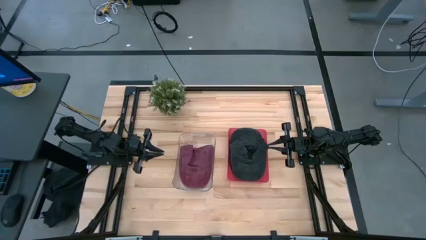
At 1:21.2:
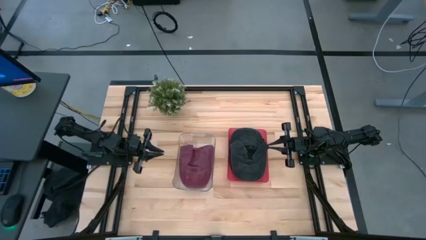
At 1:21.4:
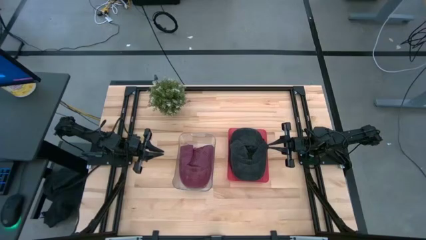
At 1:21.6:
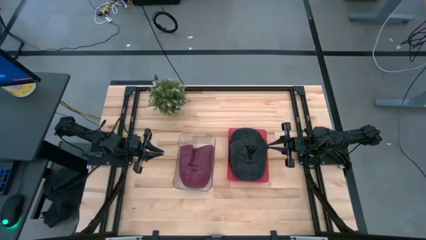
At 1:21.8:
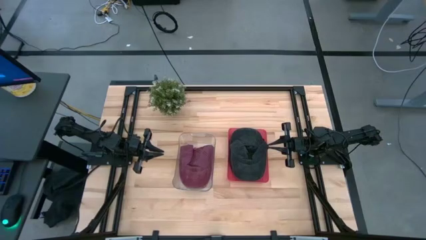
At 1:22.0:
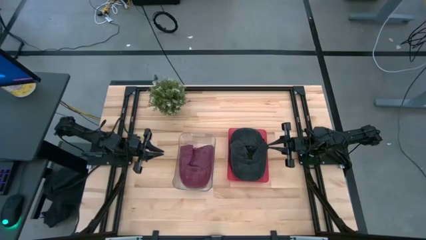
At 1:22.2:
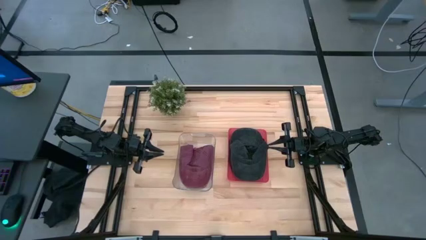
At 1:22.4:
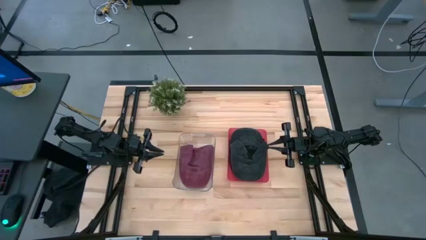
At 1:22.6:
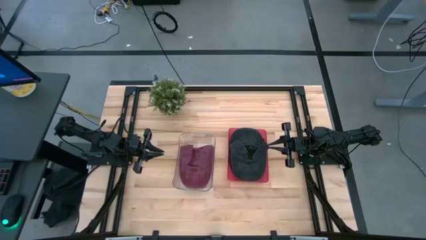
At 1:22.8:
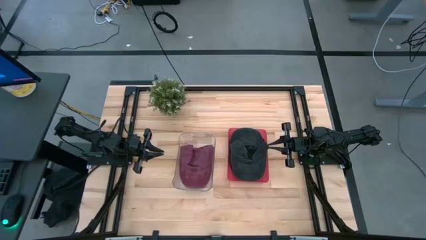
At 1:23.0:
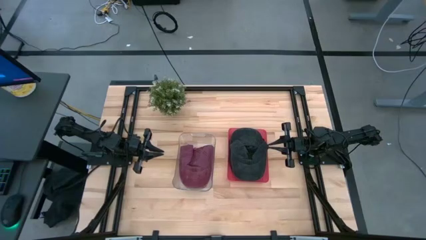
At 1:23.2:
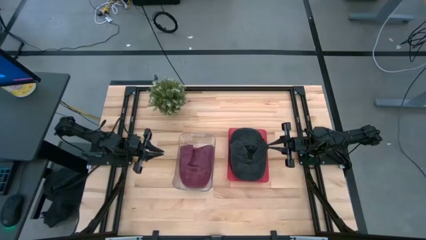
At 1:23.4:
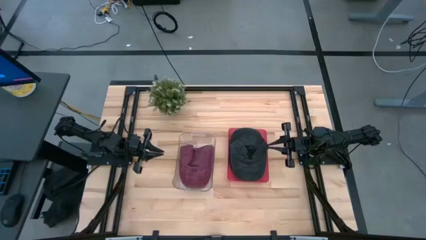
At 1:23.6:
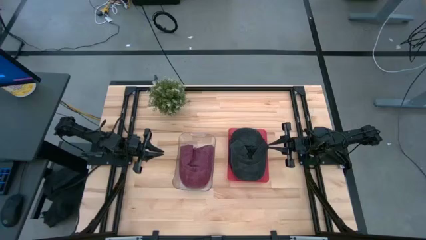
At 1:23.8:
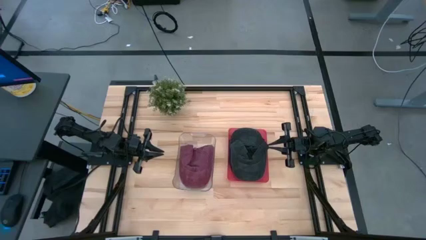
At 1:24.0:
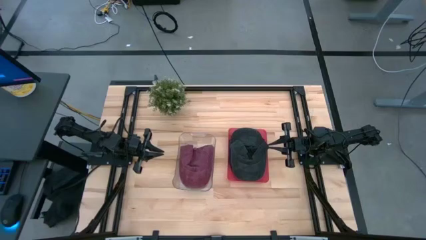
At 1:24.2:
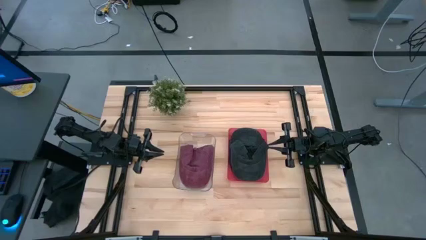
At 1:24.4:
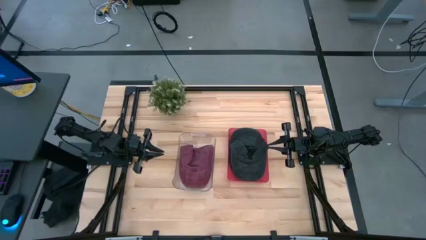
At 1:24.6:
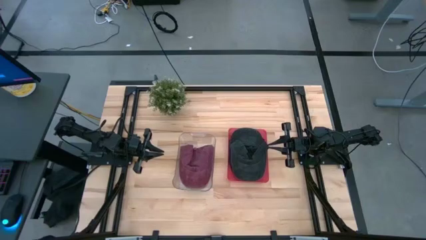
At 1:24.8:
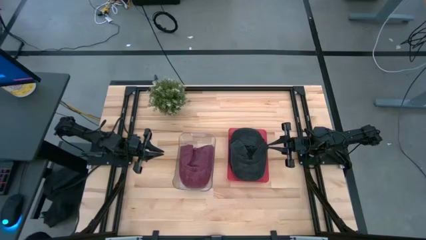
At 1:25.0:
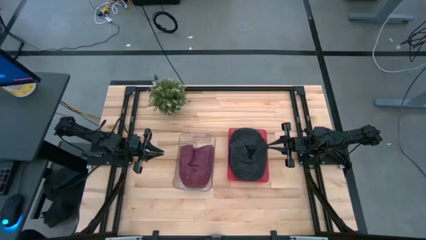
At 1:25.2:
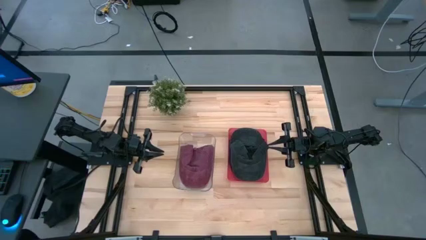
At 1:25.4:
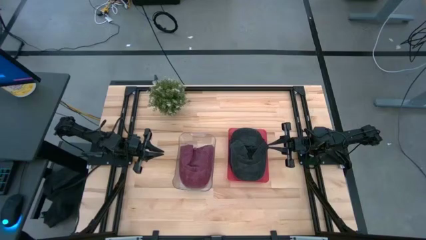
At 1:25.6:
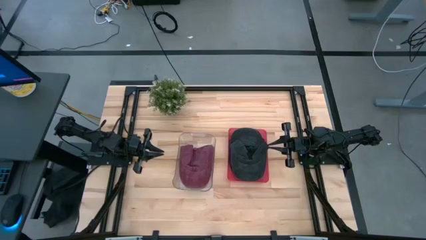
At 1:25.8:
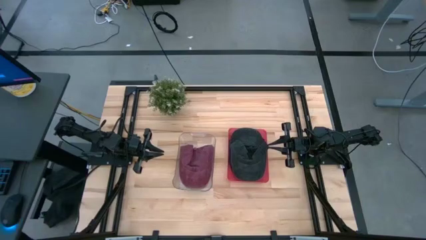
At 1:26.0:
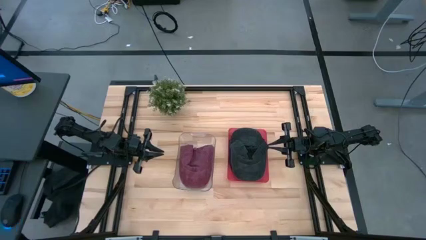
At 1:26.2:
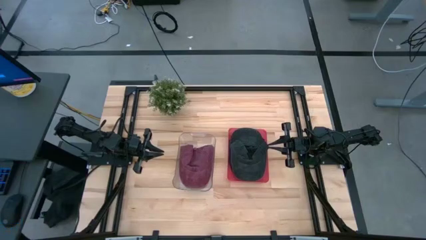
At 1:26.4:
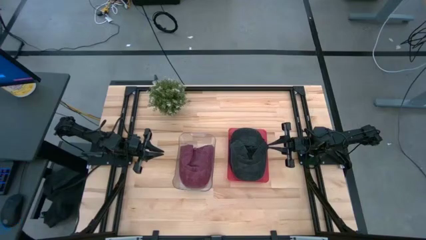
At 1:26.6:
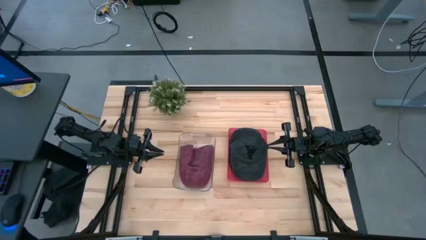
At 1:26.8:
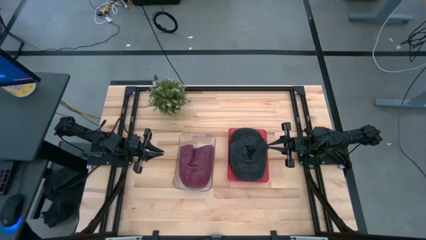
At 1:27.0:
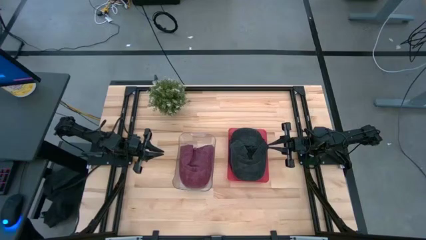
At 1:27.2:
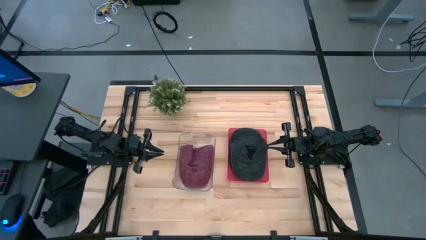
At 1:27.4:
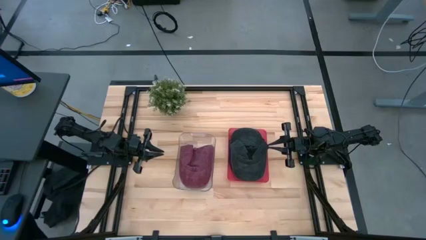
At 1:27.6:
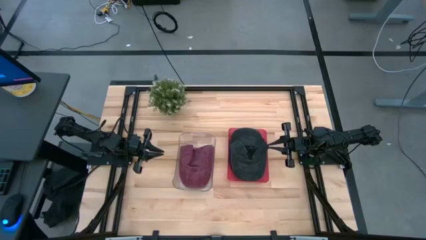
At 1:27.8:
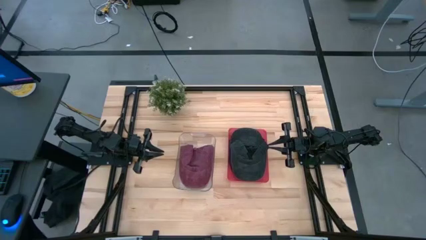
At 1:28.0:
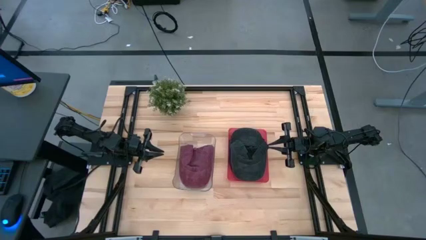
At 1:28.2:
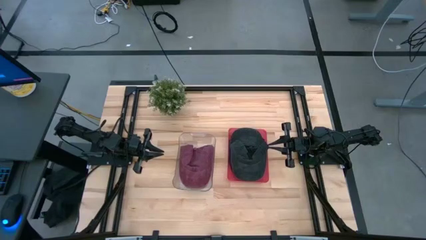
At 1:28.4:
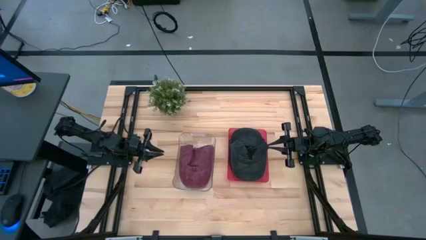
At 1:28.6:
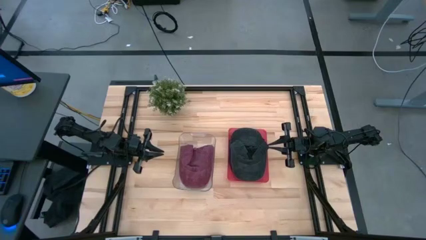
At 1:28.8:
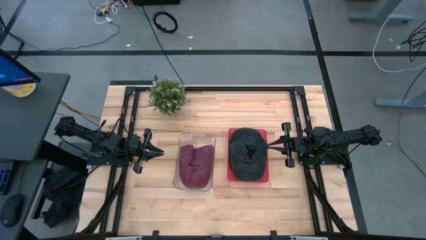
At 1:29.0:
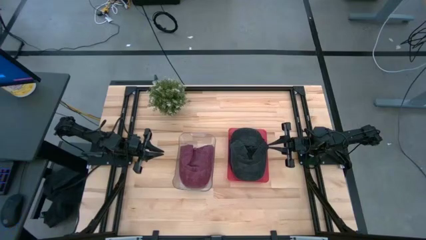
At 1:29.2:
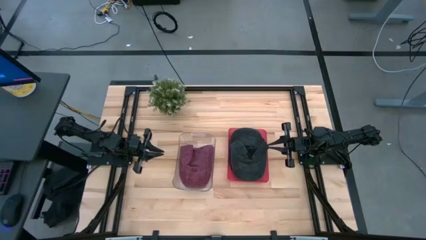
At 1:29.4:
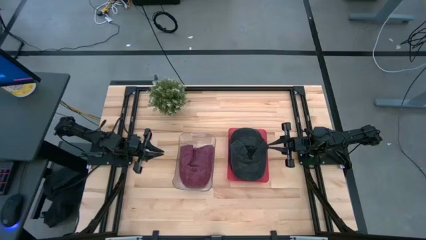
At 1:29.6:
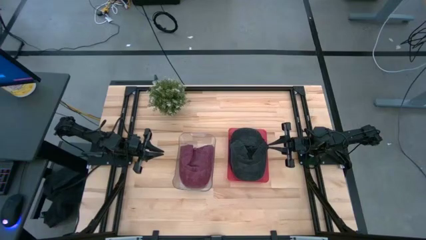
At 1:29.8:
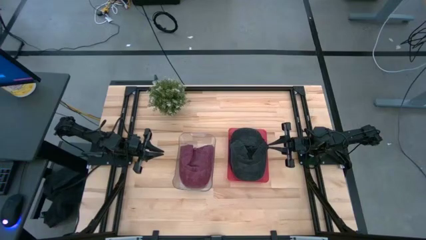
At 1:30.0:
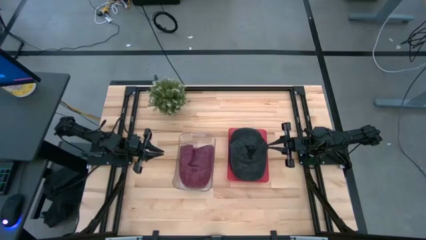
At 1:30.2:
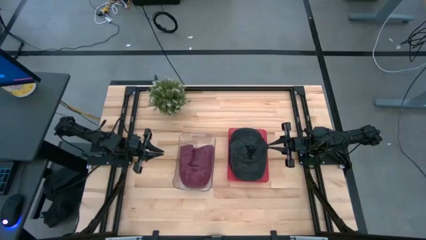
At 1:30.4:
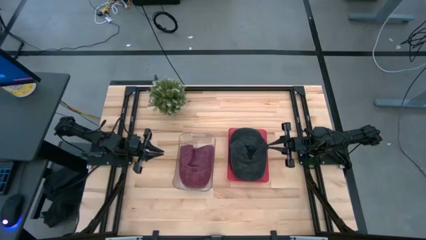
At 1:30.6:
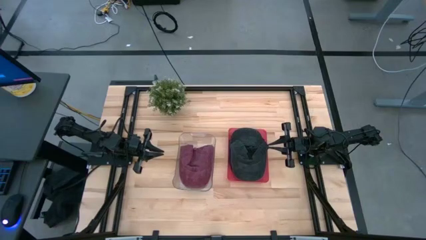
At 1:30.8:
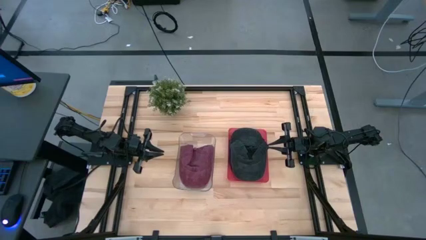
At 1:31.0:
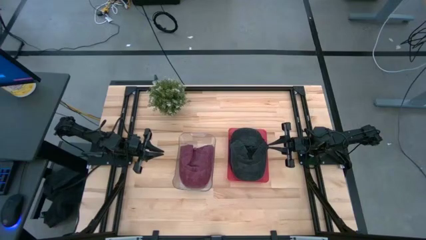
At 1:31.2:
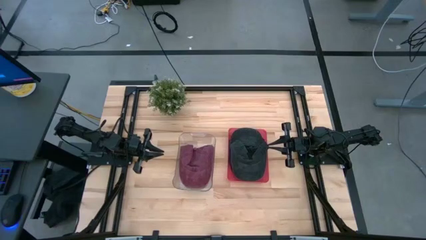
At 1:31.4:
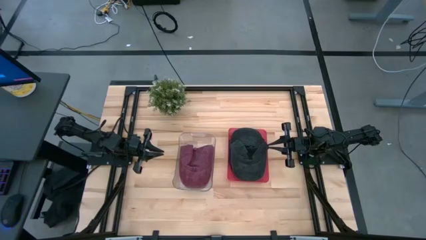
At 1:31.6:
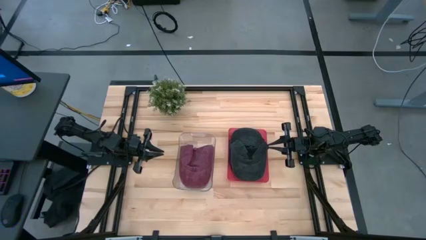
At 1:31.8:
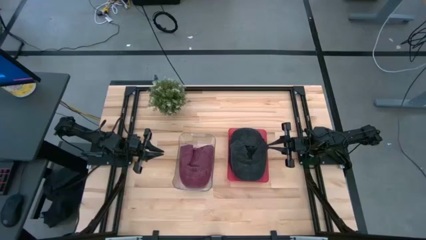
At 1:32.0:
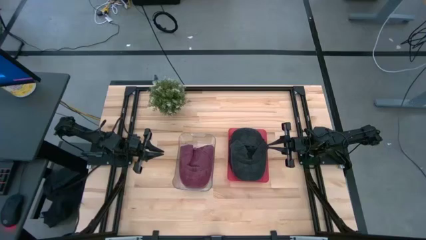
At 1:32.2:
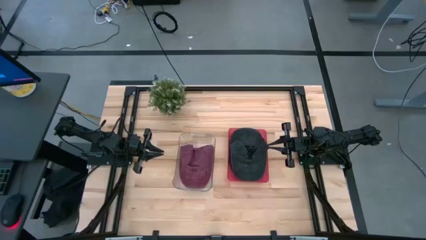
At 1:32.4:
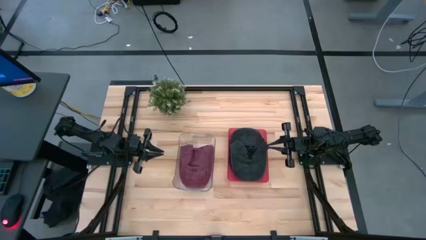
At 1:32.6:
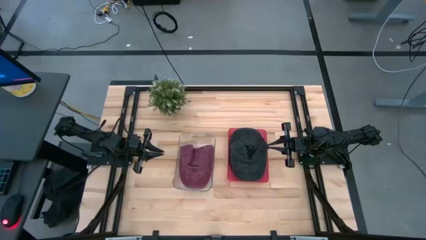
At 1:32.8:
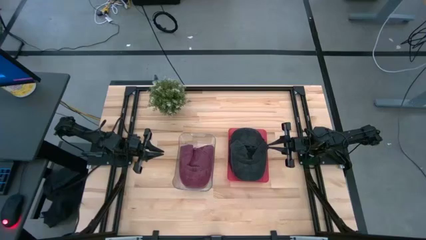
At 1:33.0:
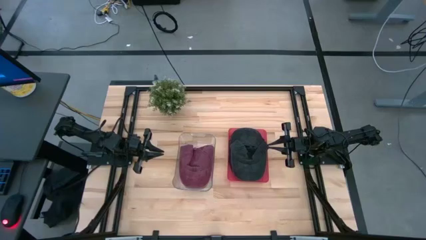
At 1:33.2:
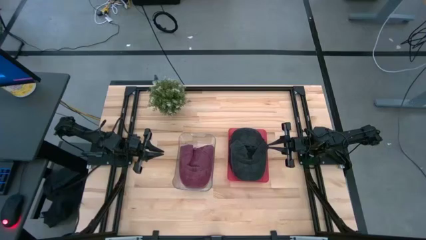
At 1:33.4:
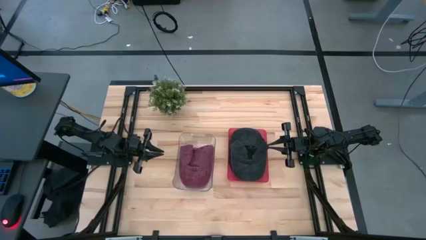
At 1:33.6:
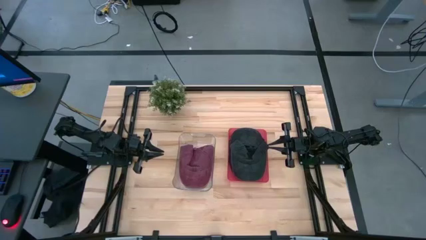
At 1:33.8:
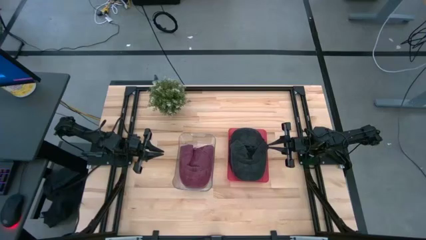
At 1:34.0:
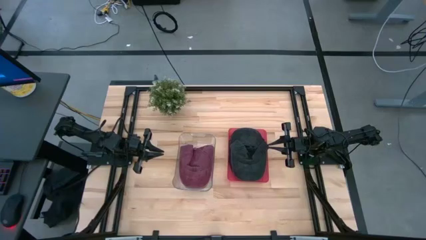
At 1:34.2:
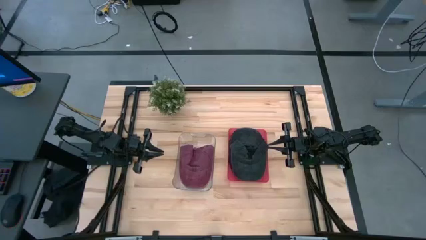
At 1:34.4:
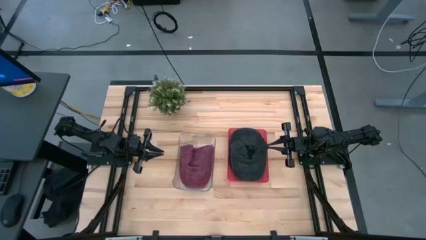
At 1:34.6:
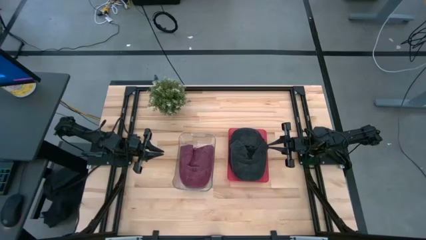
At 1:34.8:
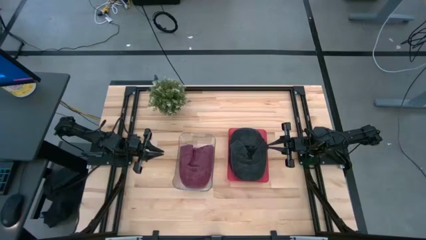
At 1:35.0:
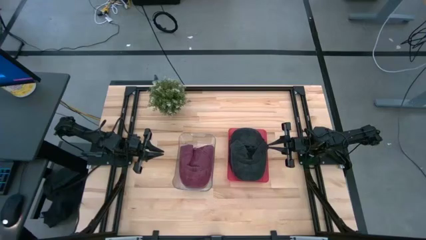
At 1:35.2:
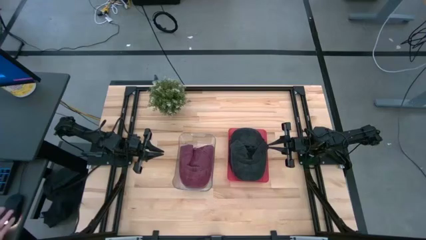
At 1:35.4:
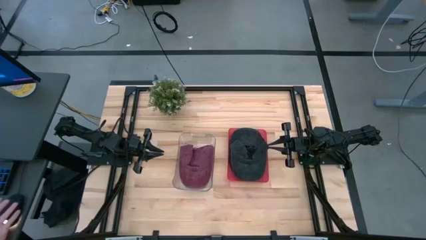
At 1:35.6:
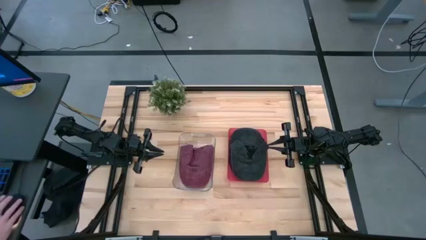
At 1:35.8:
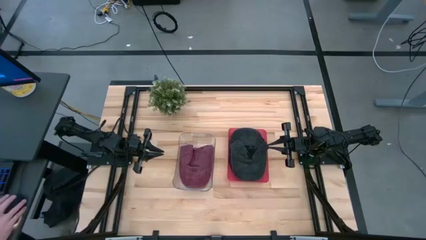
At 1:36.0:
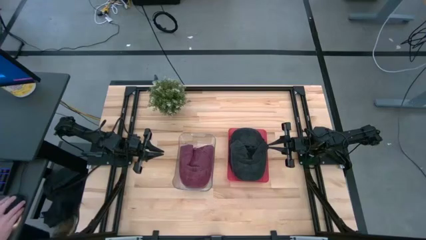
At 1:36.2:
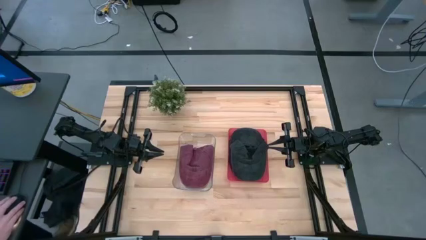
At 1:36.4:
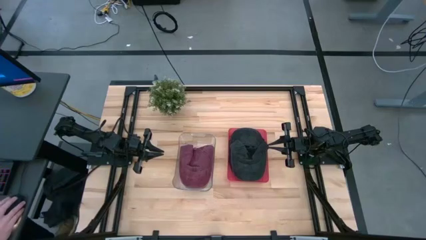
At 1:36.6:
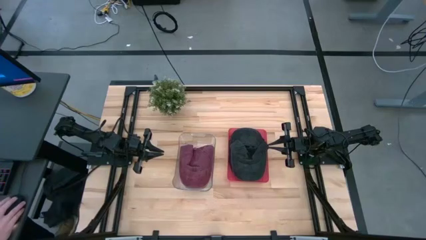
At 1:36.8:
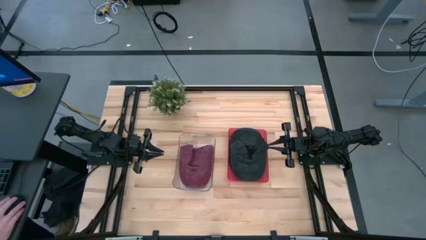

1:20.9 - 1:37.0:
Task: Pick & Place hat
Return to Home Position
